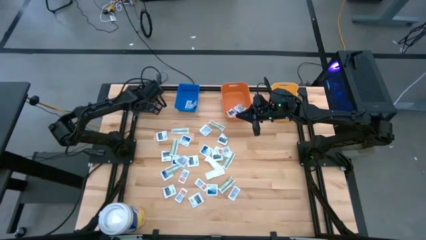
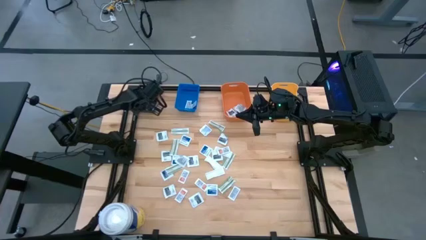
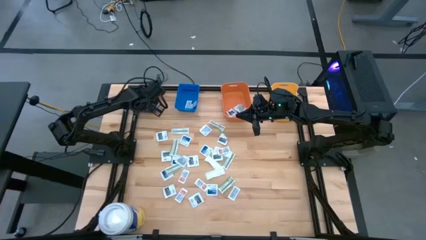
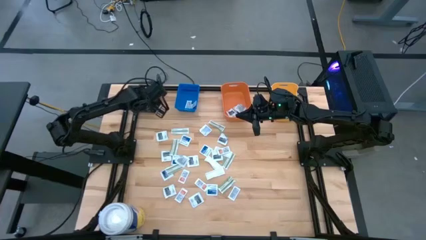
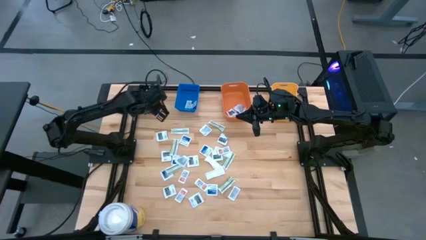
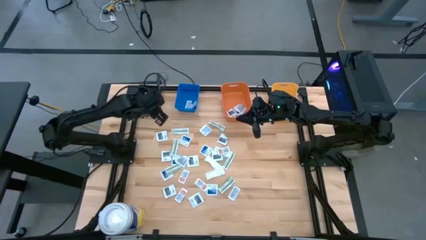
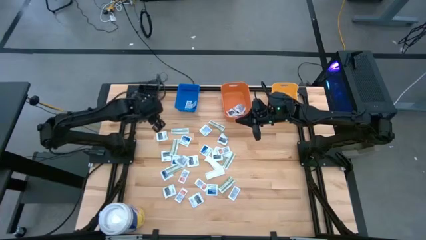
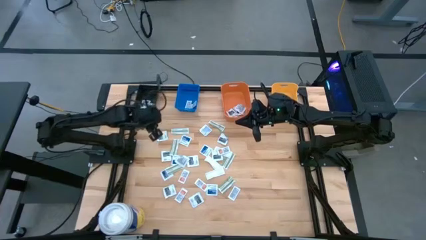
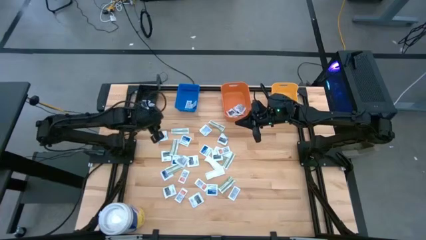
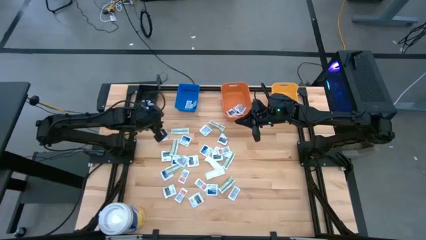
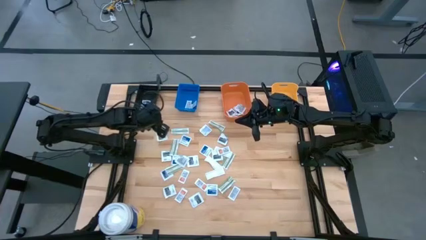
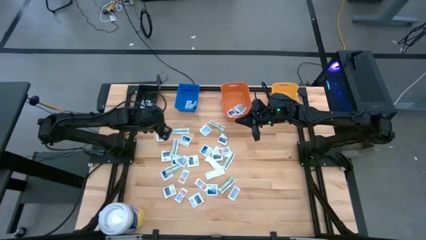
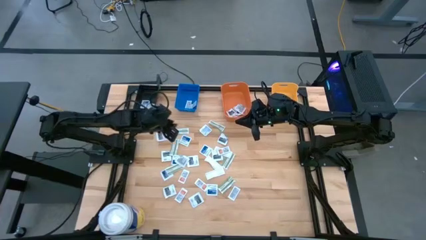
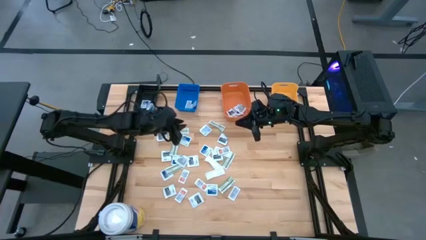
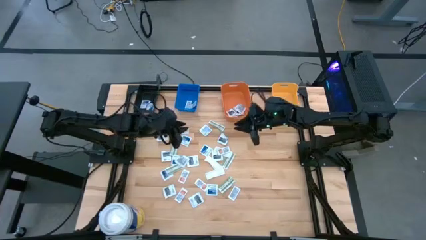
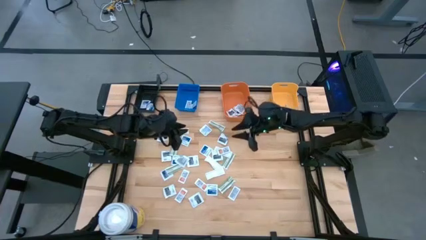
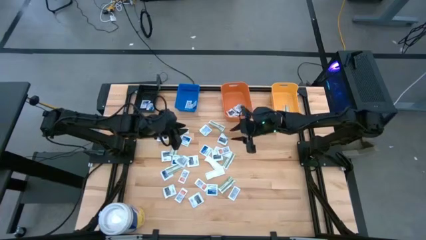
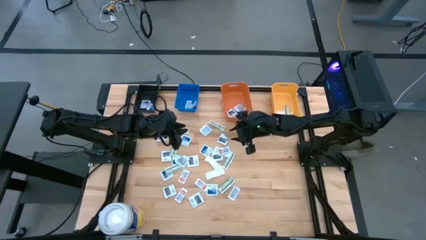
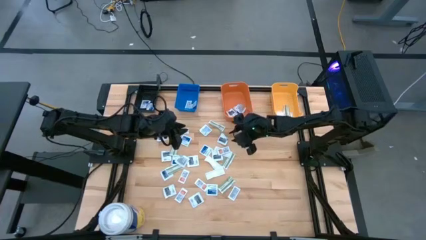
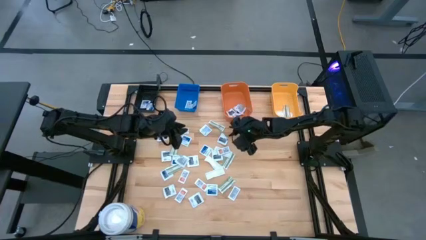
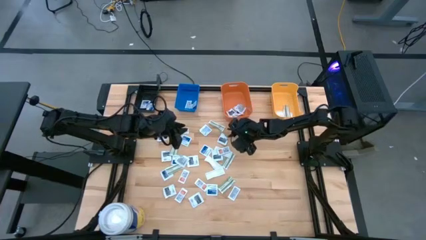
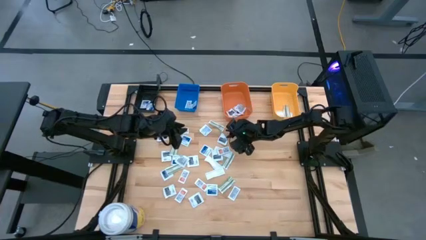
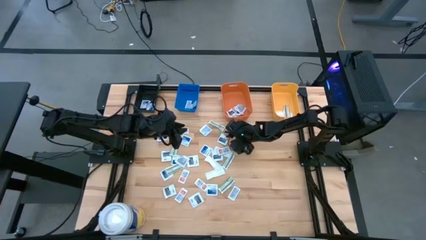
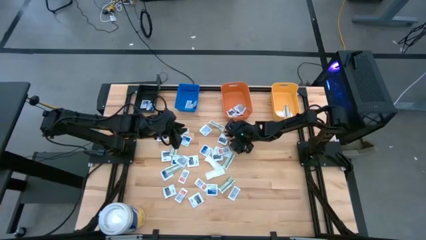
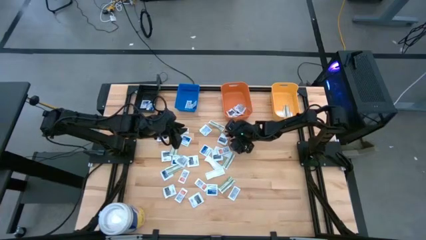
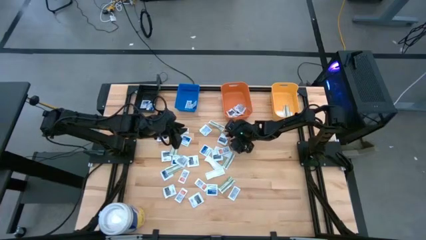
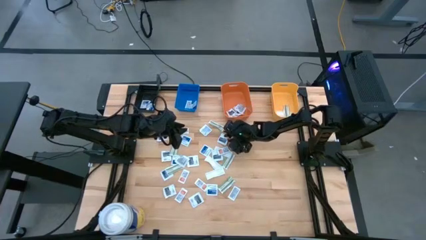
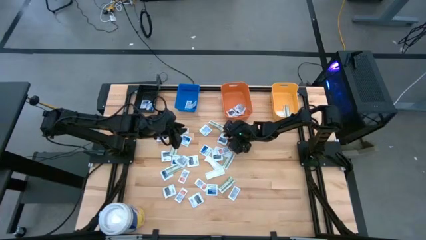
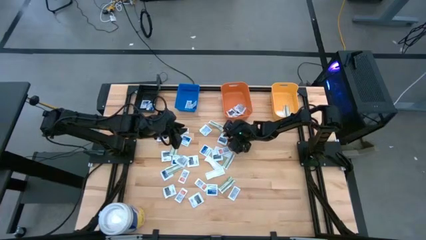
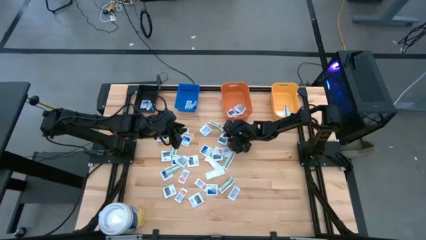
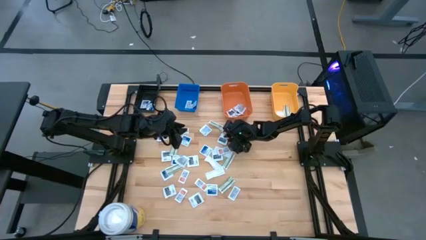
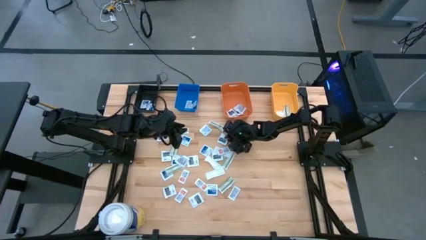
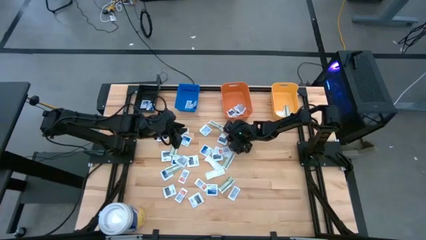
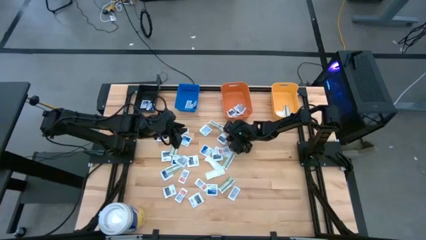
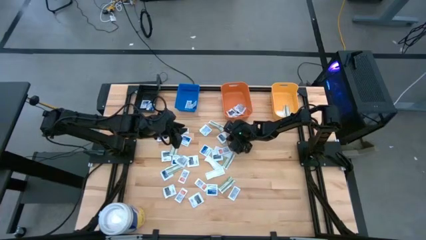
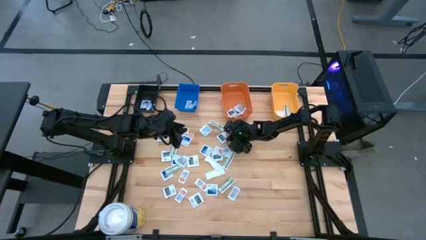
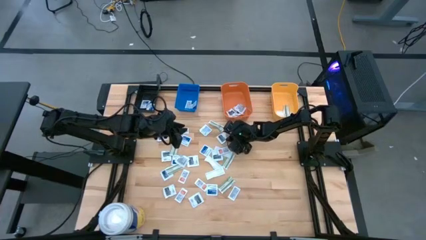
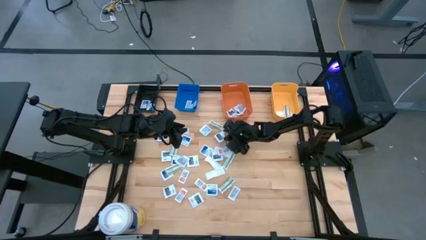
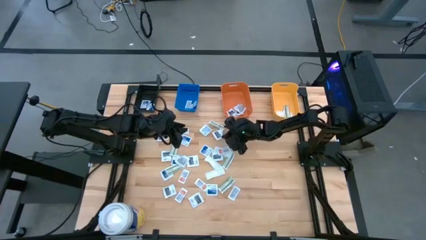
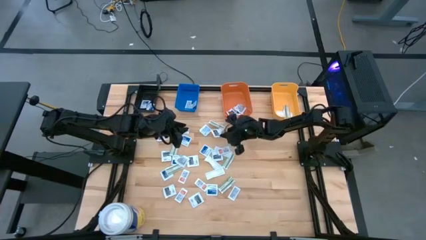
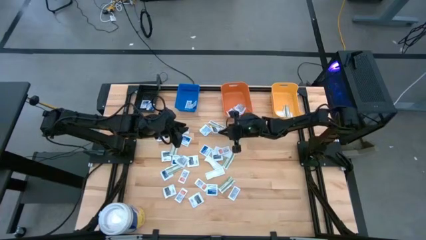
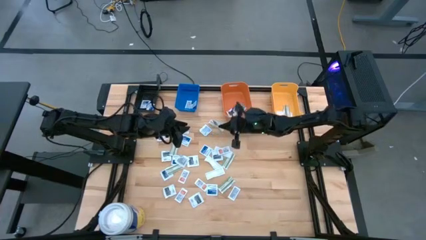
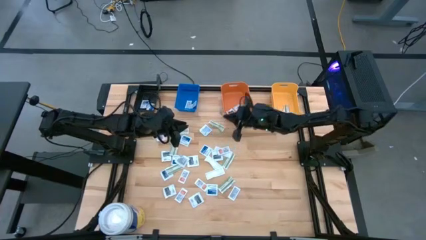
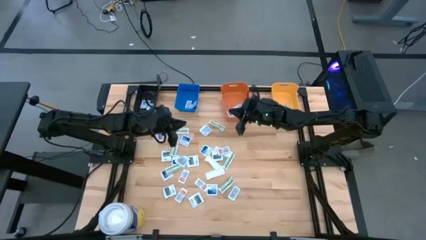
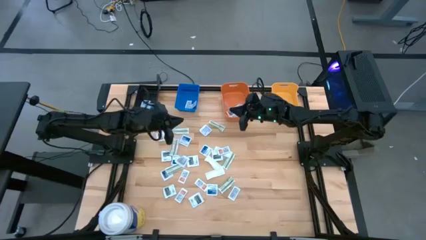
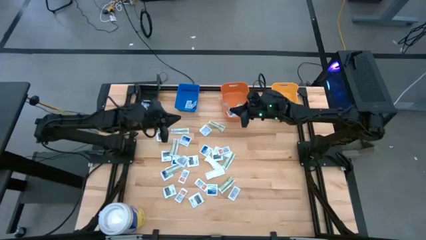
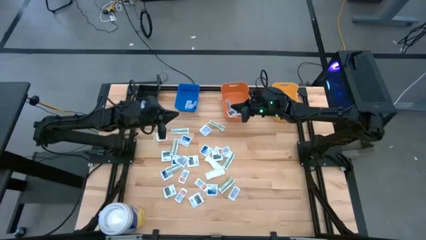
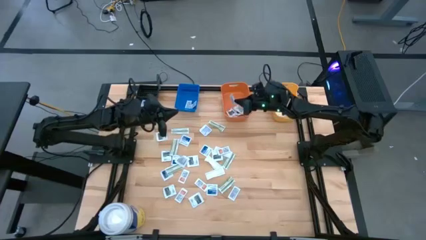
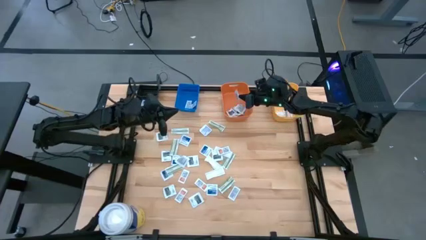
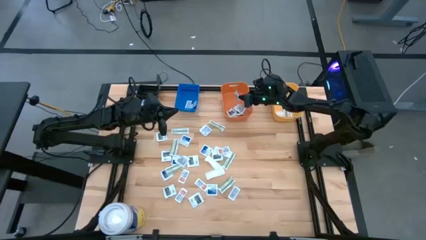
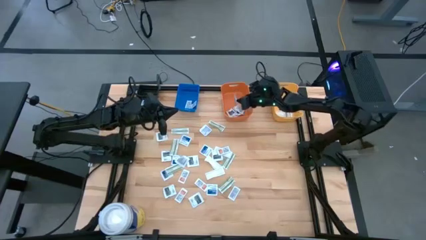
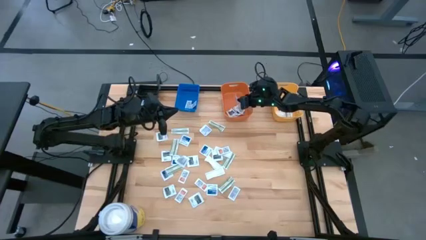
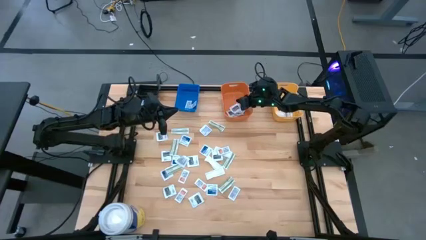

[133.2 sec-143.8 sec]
Task: Pick & Place First Aid Supplies
Put the towelette pack into the orange bin

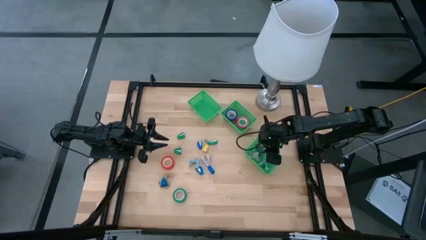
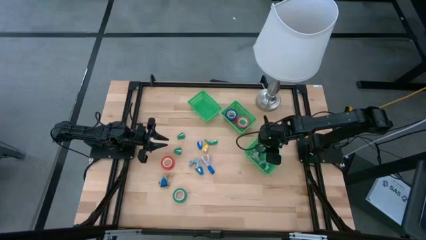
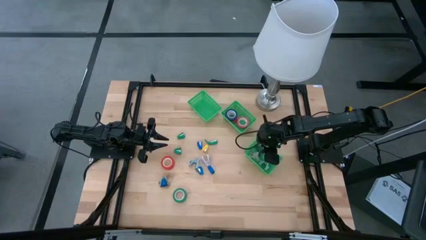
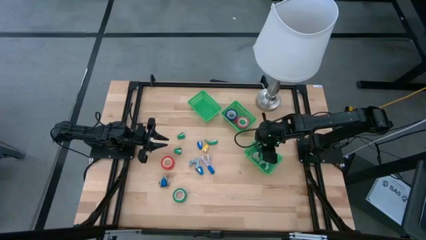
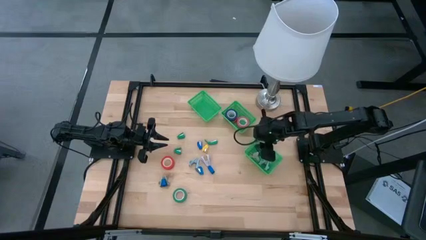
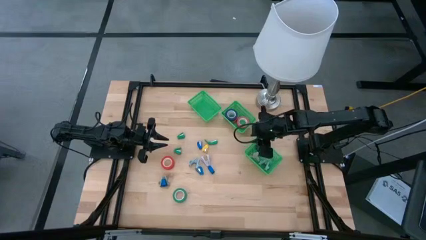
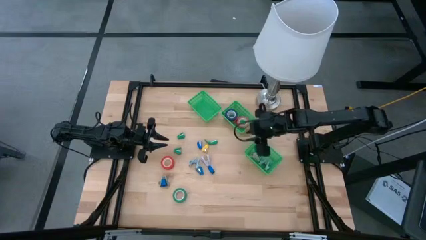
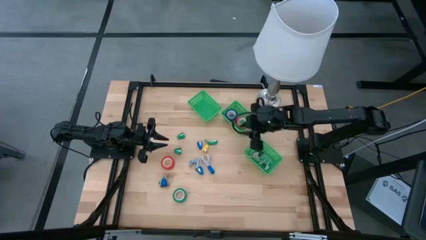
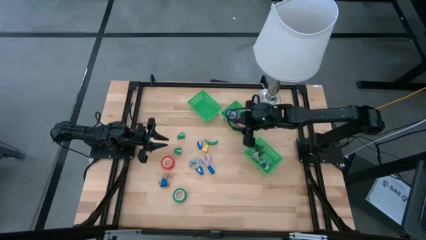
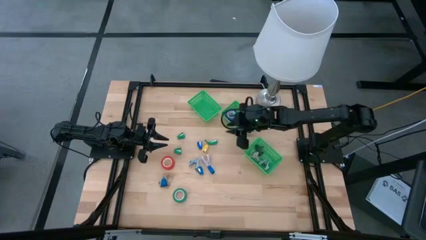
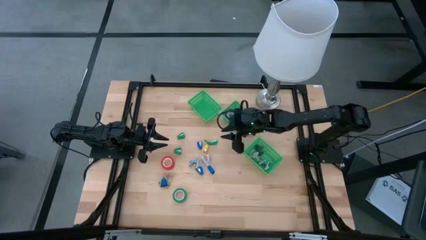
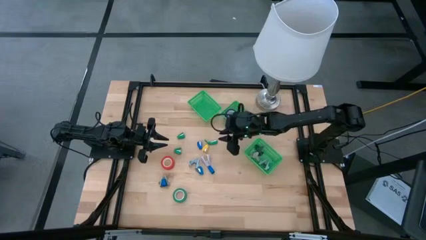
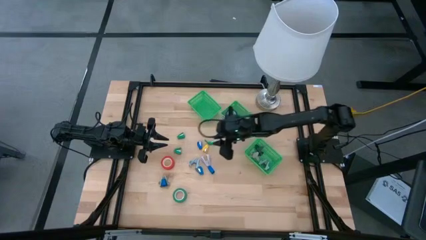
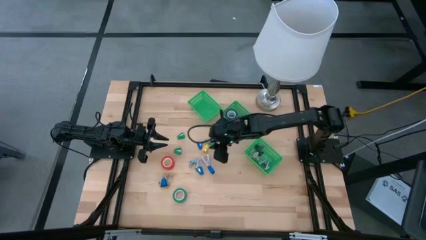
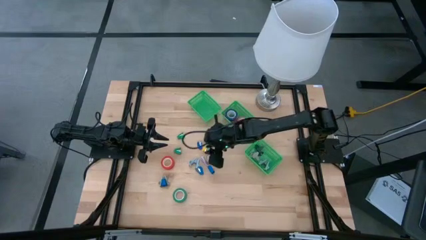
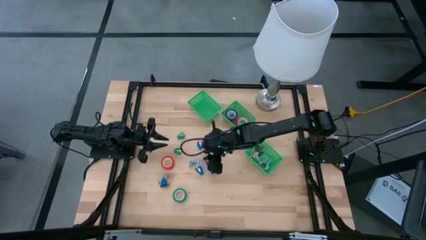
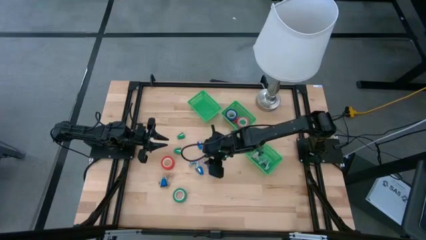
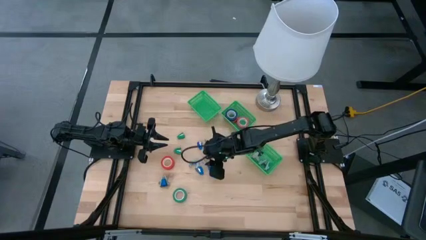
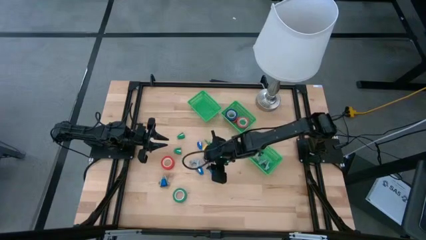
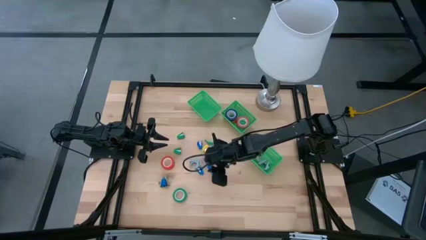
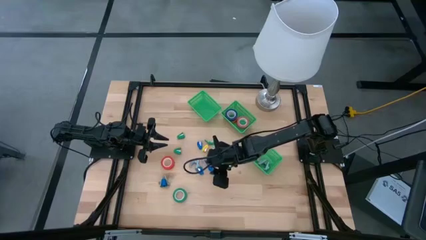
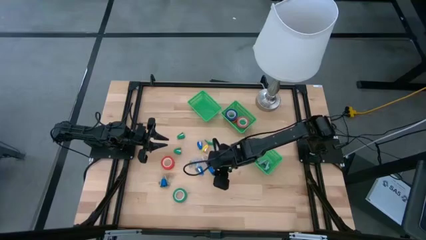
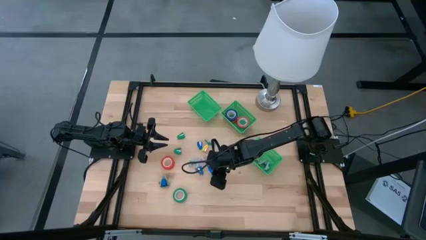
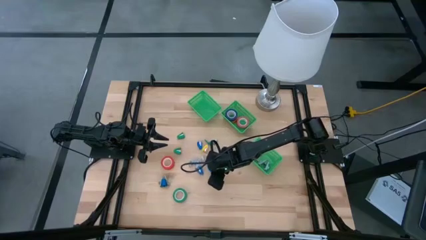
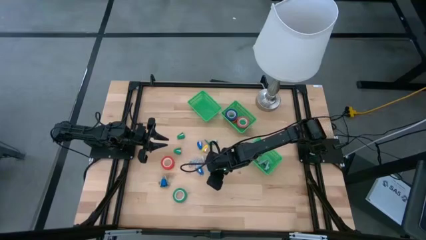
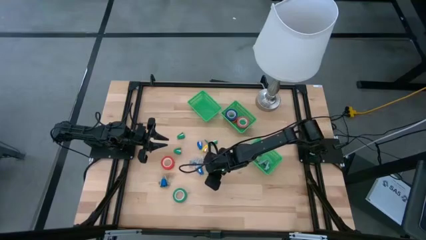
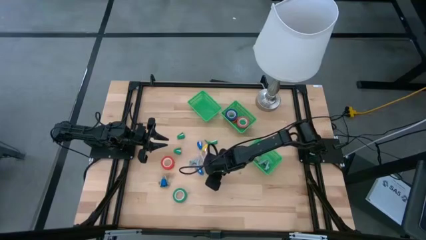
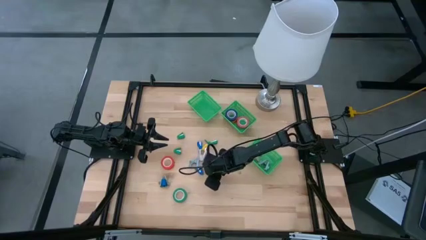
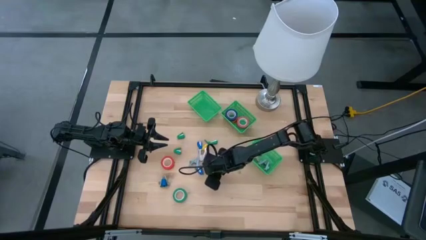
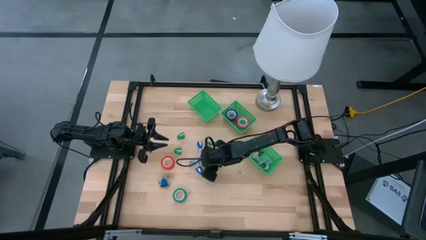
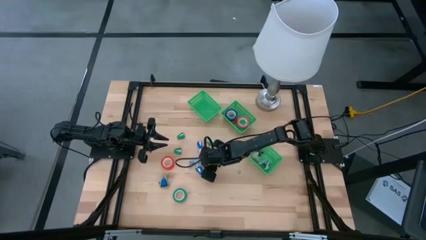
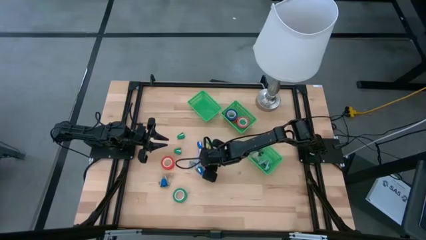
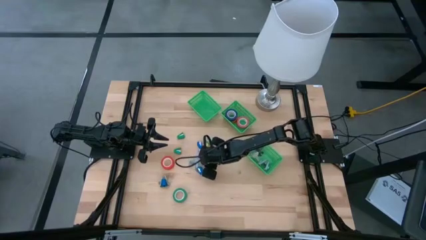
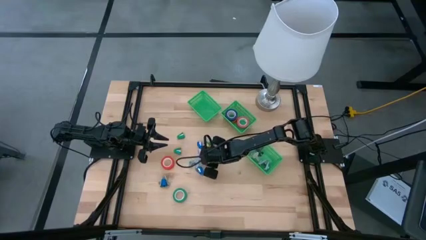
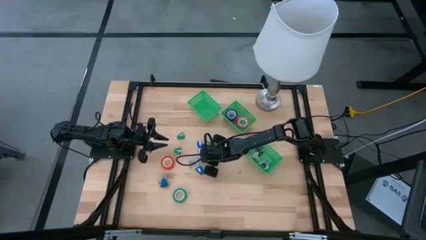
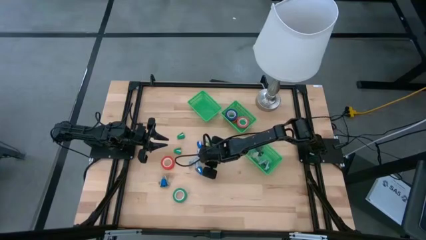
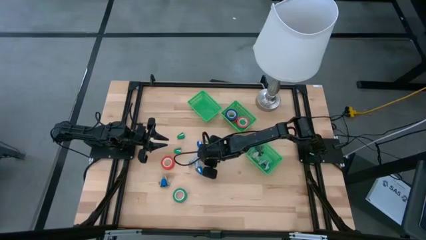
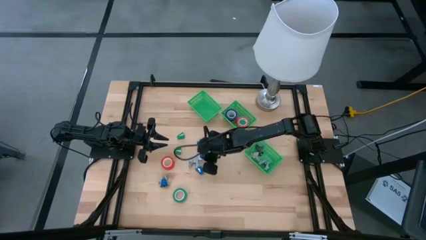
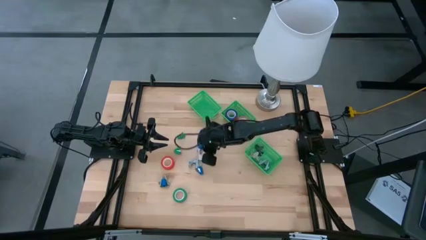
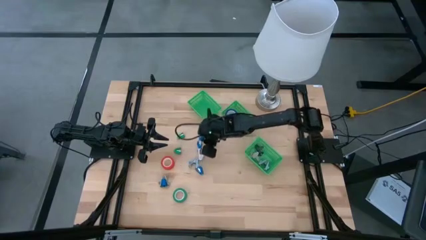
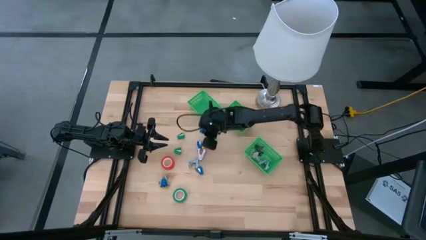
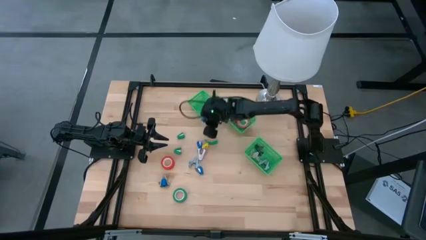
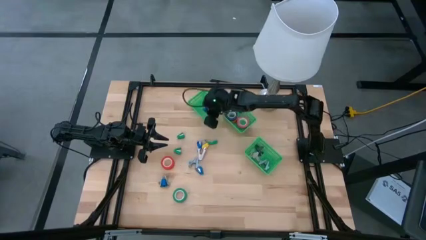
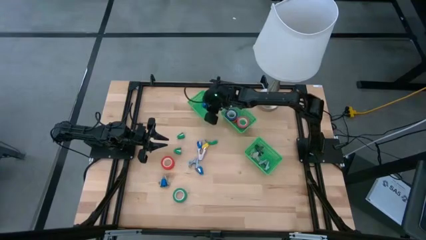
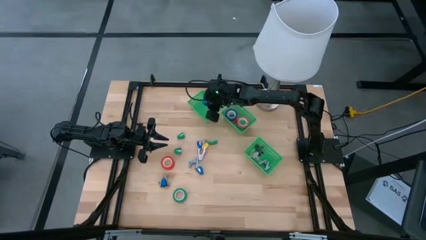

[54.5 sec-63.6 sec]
Task: Pick and place Stapler, Stapler remover, tape
Put the blue stapler into the top basket
